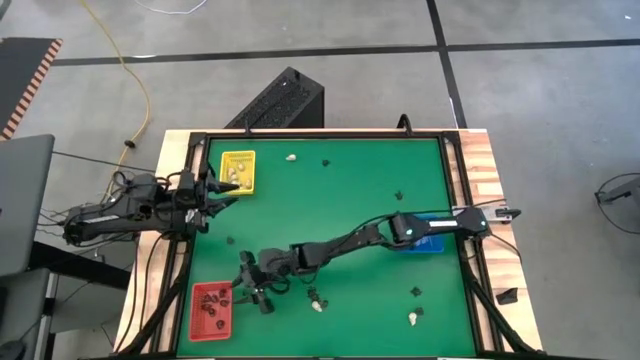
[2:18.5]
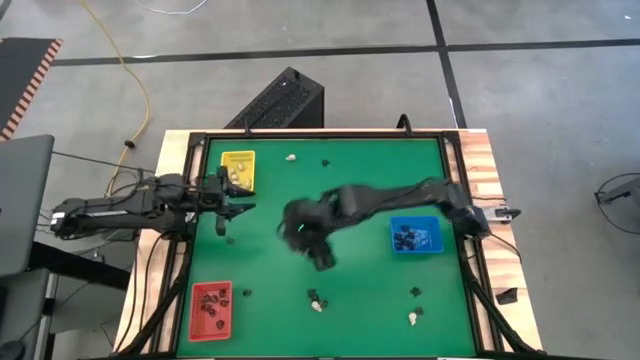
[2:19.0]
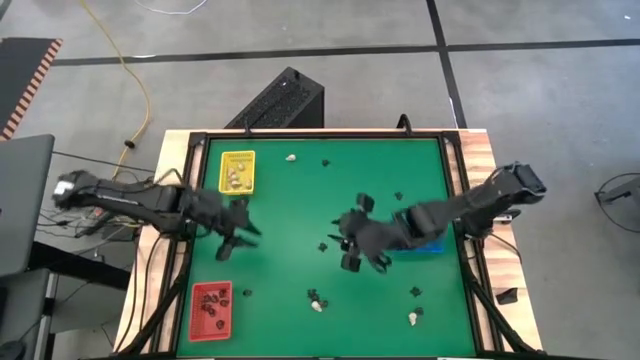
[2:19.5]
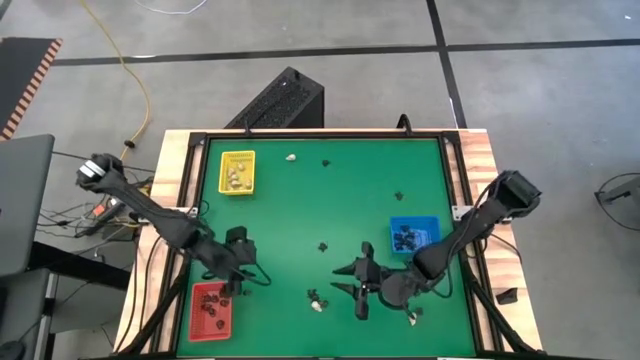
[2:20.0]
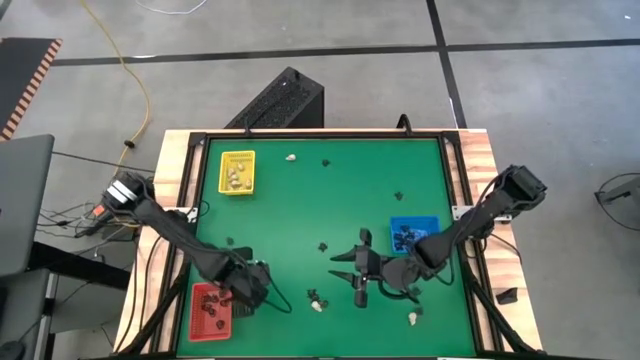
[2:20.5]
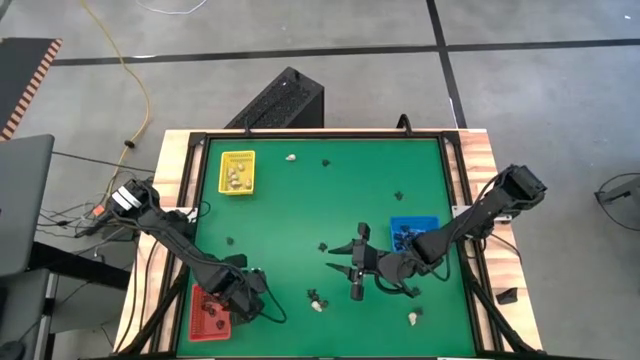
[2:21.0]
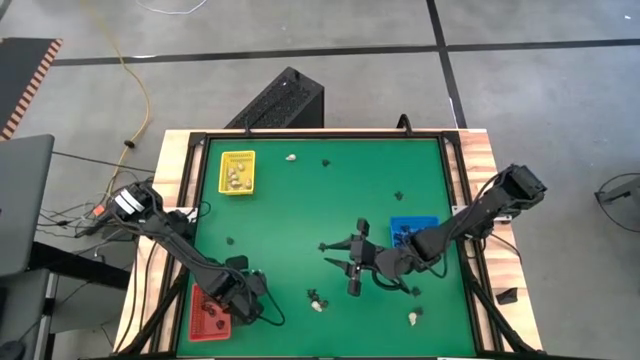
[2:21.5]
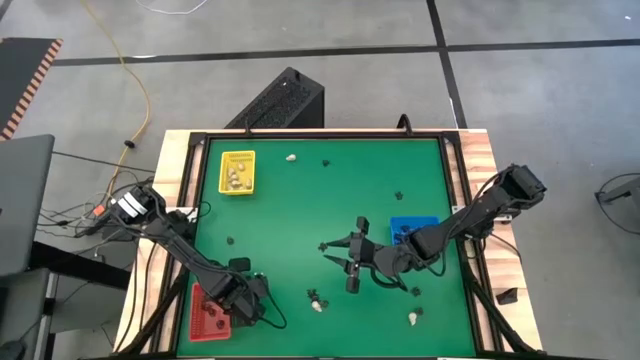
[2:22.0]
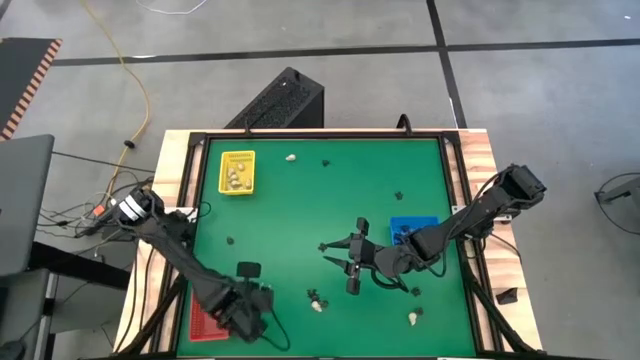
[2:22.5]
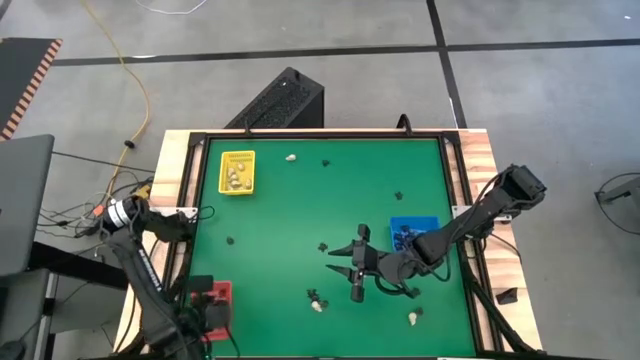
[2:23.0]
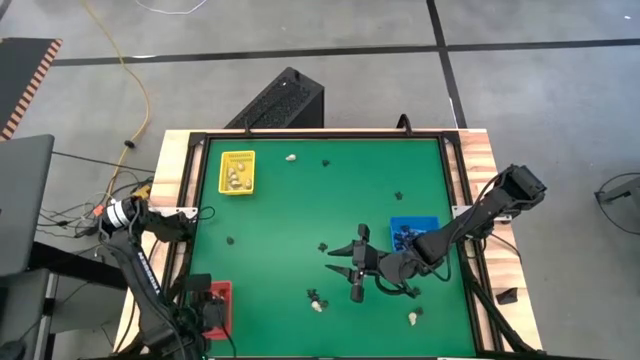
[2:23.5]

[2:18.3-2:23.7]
Task: Sort Halloween decoration
Put the black skull toy into the red bin

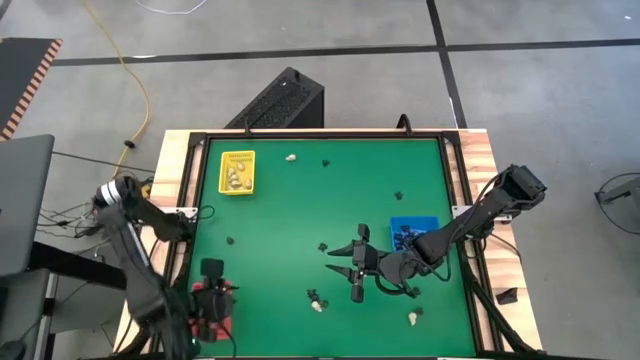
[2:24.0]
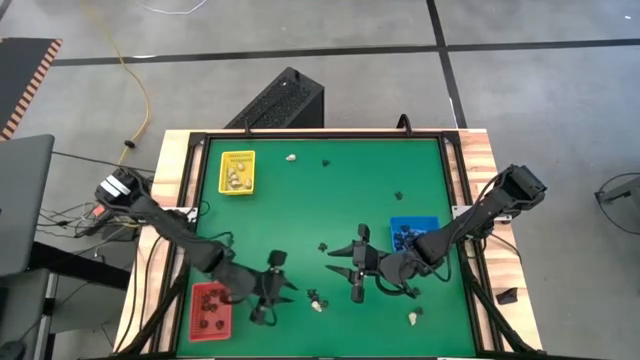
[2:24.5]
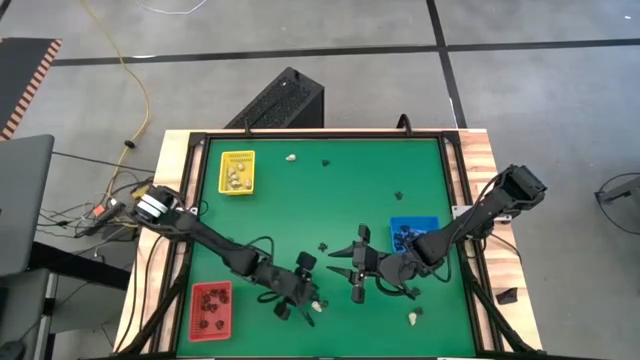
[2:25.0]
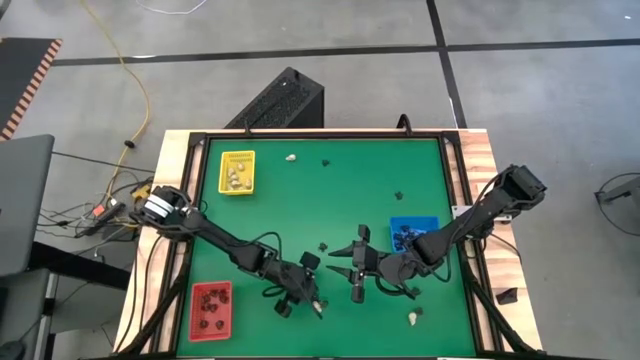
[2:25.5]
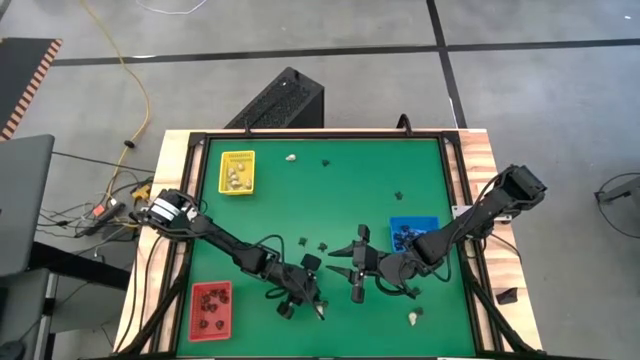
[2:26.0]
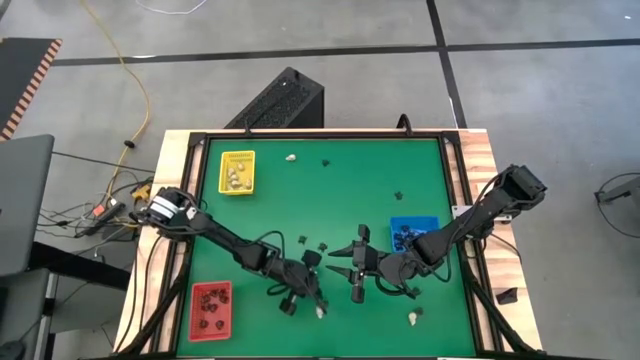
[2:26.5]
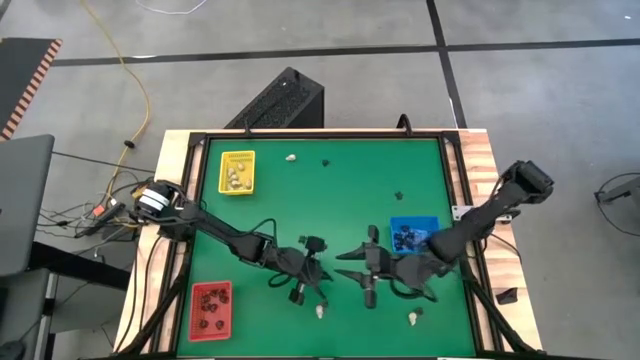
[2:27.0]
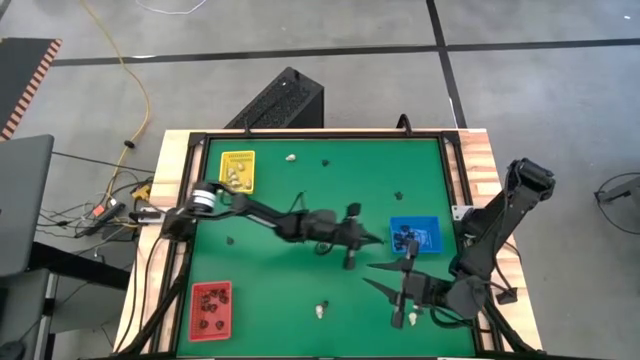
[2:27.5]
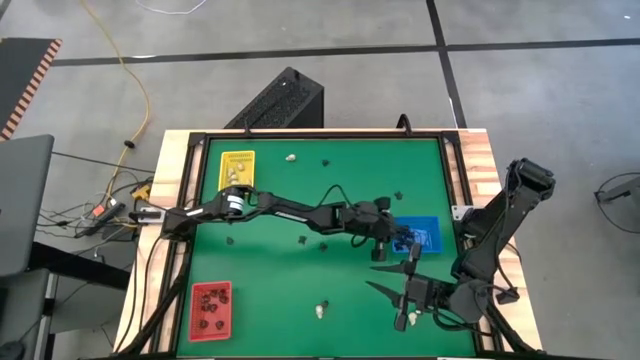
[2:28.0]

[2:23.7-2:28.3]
Put the black spider toy into the blue bin

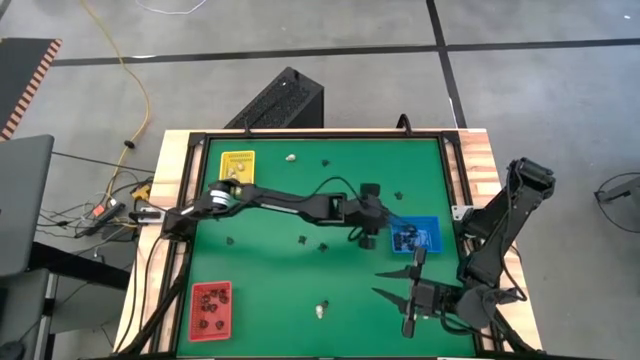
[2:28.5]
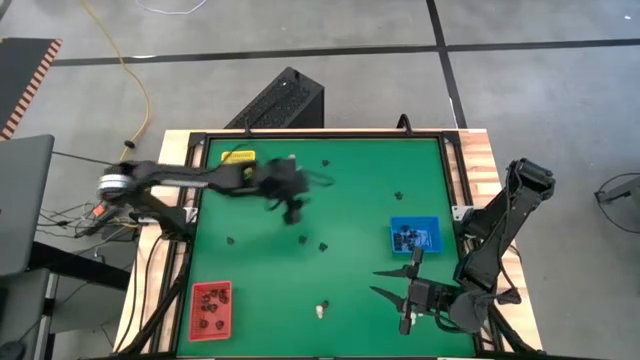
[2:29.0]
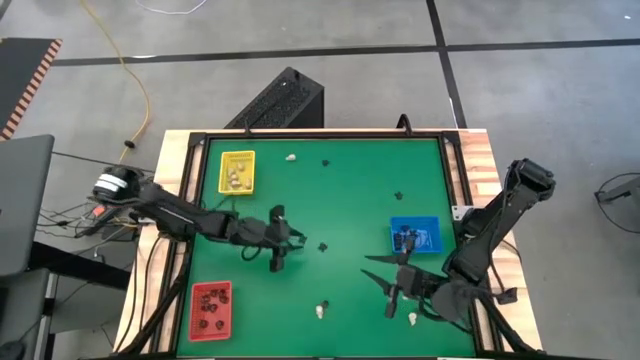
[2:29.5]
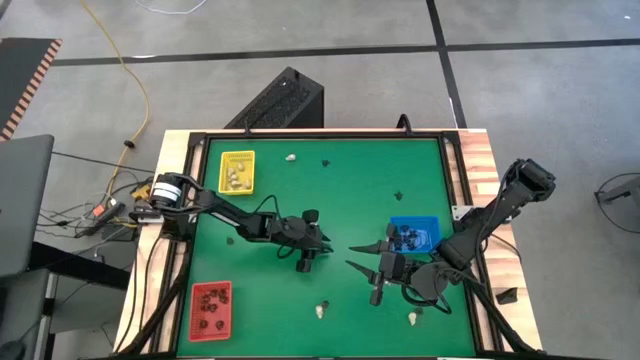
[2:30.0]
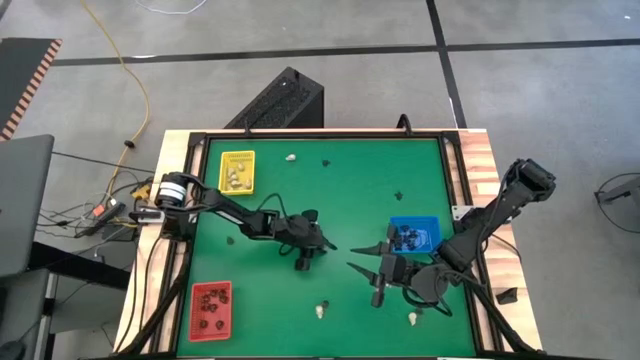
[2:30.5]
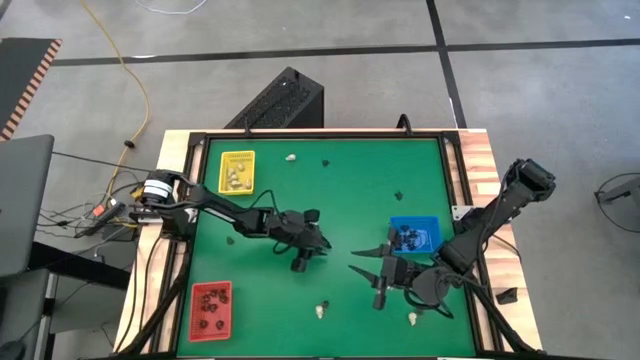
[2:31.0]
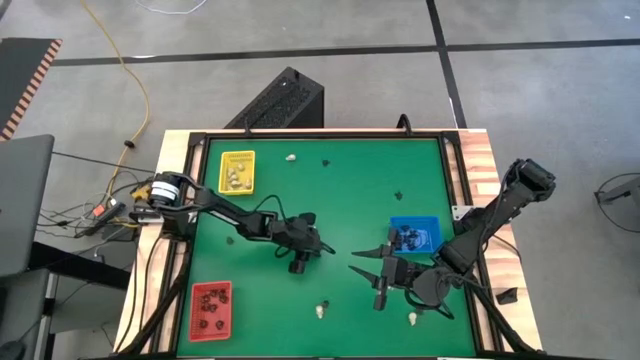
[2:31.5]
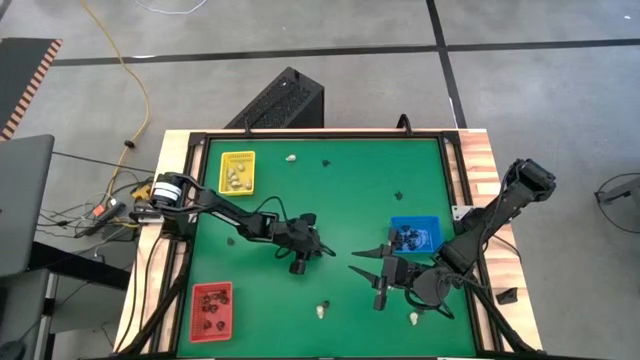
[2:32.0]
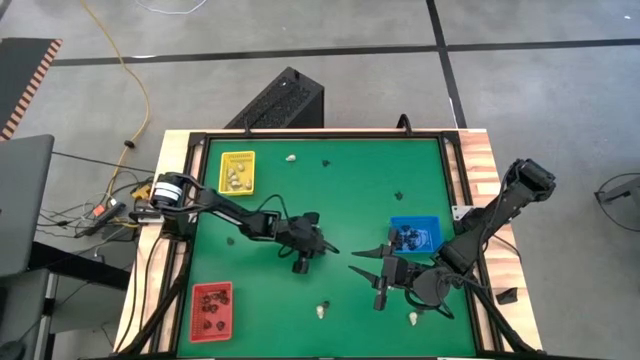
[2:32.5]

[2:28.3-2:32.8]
Put the black spider toy into the blue bin

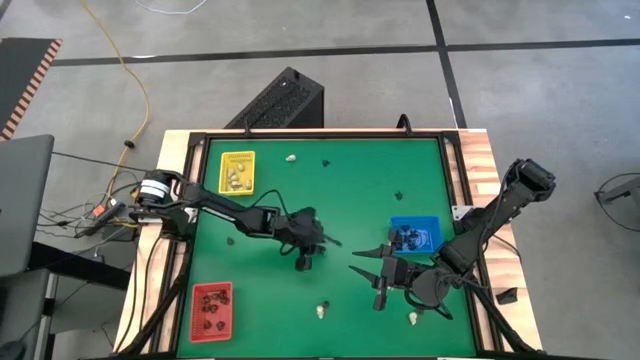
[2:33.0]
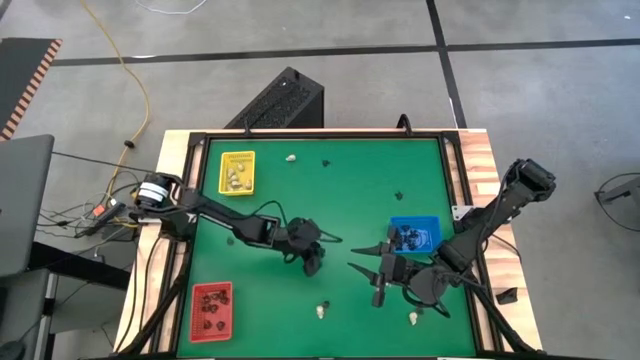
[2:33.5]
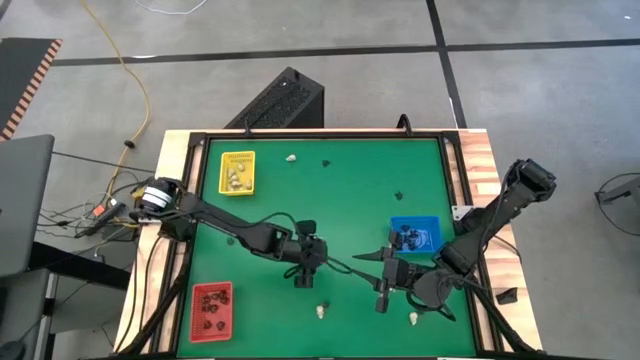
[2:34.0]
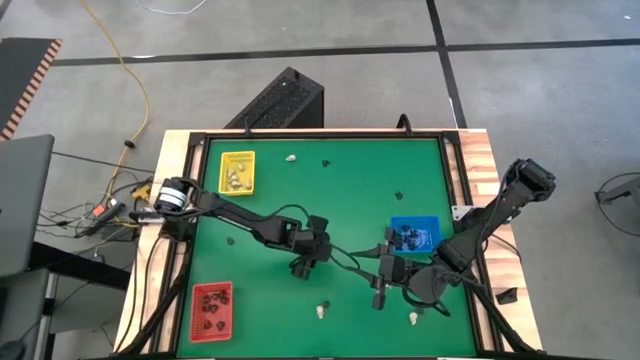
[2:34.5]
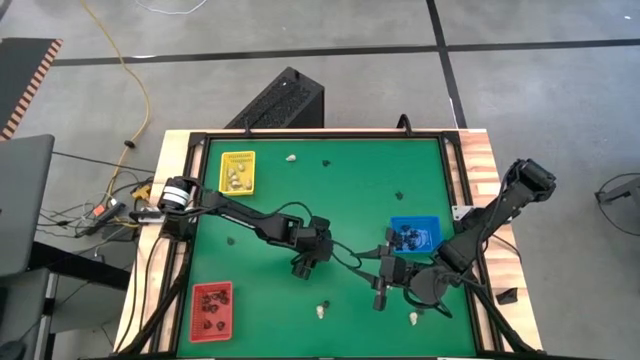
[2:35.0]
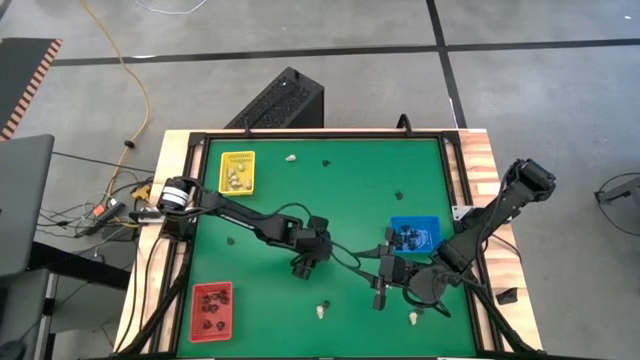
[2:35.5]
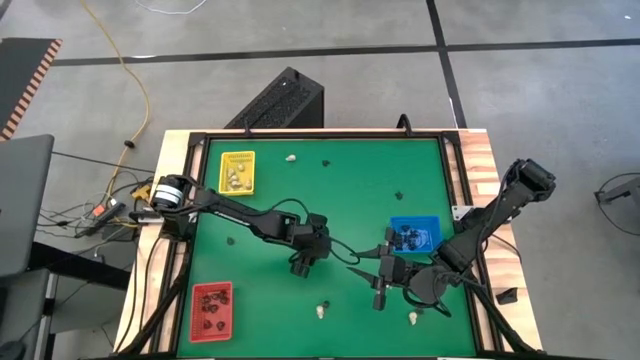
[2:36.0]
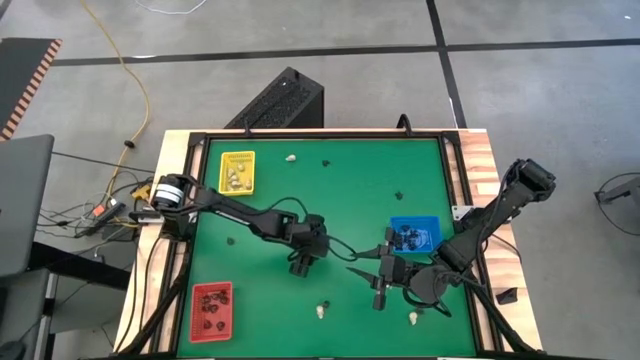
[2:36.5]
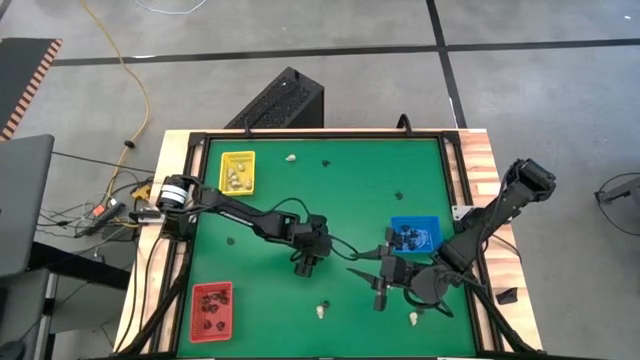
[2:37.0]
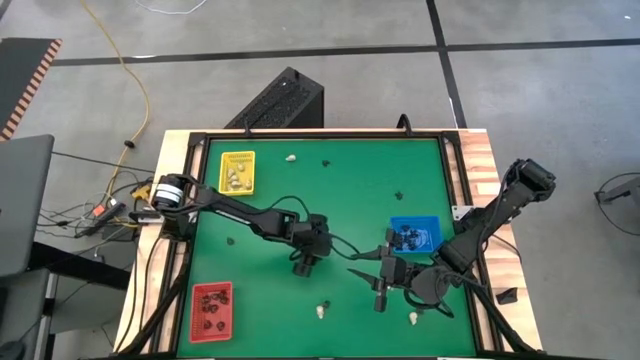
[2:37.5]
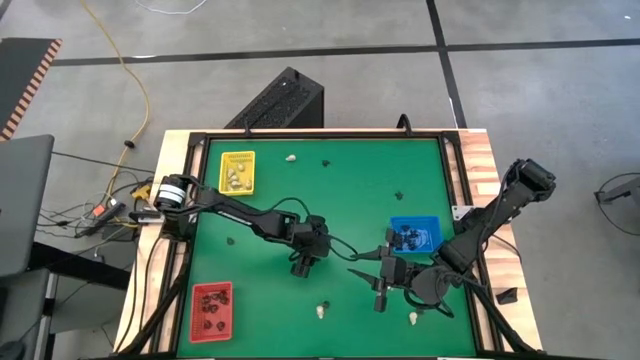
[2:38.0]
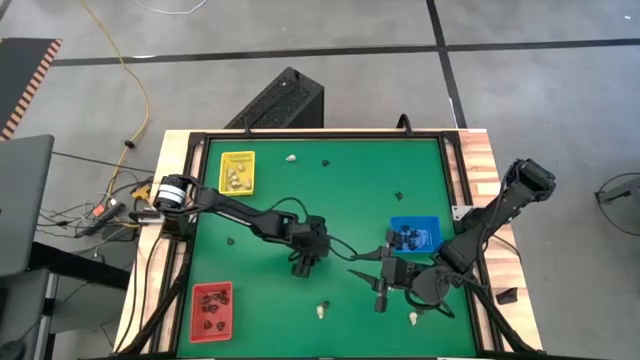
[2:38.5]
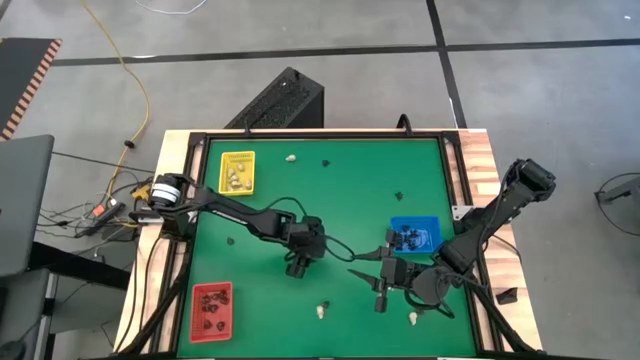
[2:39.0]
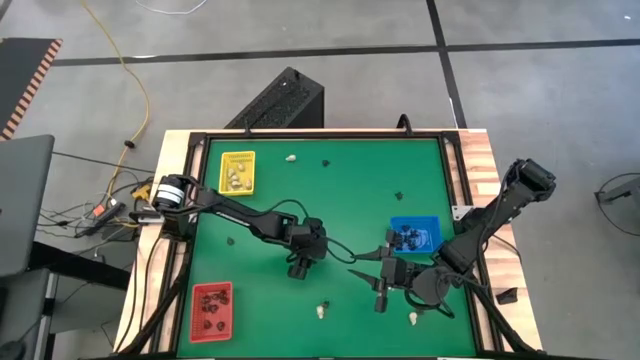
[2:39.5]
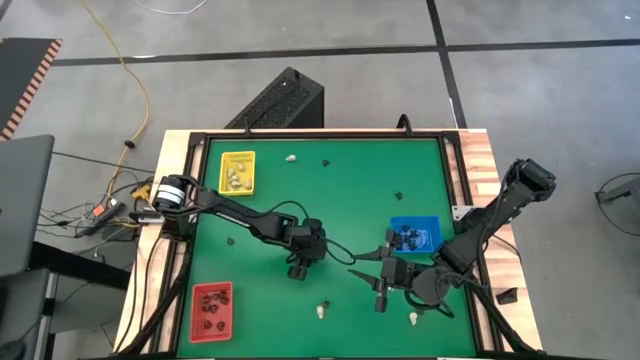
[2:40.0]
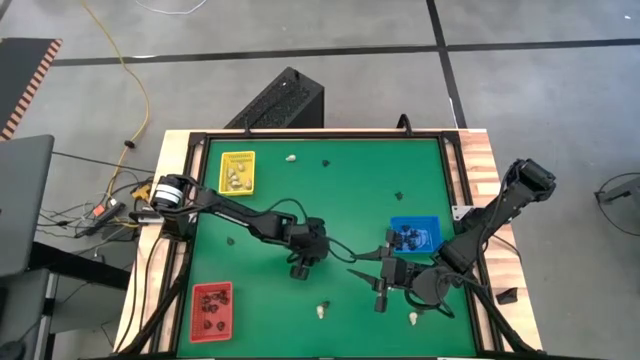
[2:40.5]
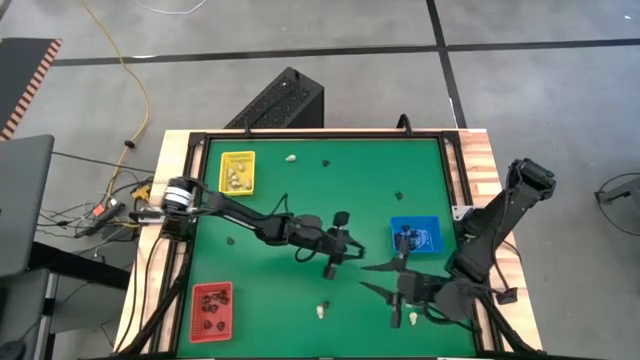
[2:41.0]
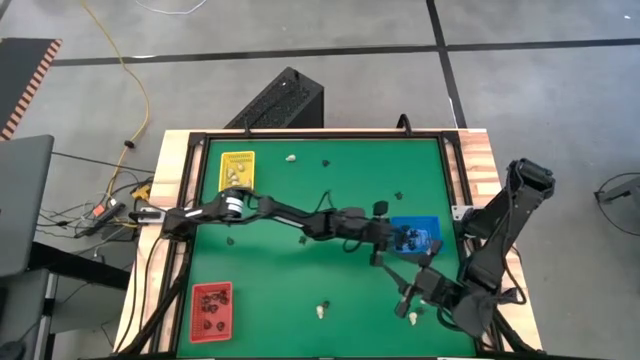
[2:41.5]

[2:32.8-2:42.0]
Put the black spider toy into the blue bin
